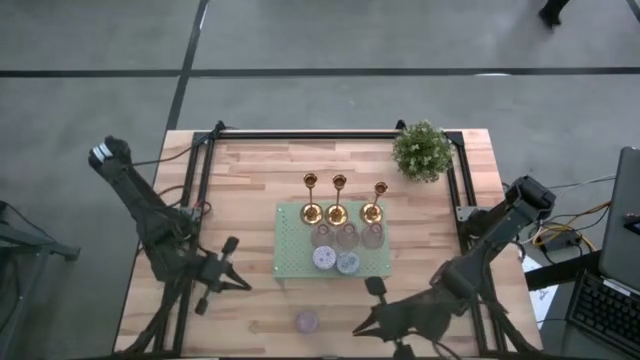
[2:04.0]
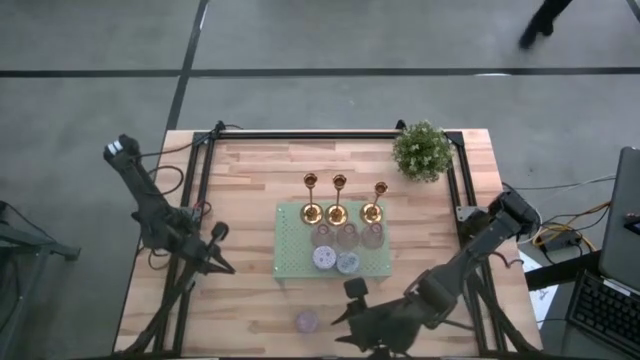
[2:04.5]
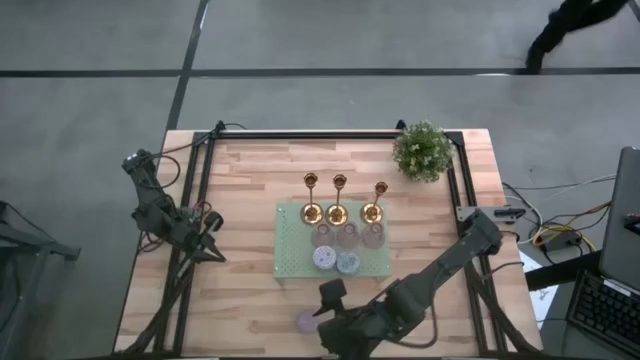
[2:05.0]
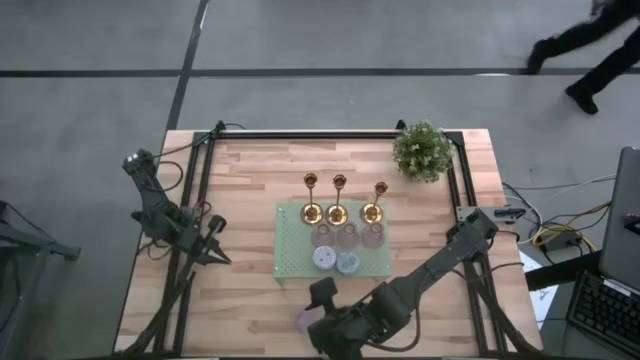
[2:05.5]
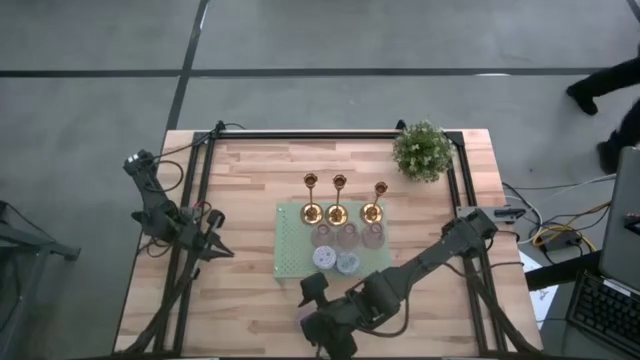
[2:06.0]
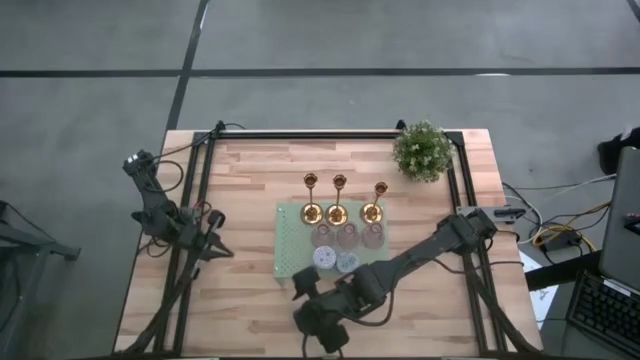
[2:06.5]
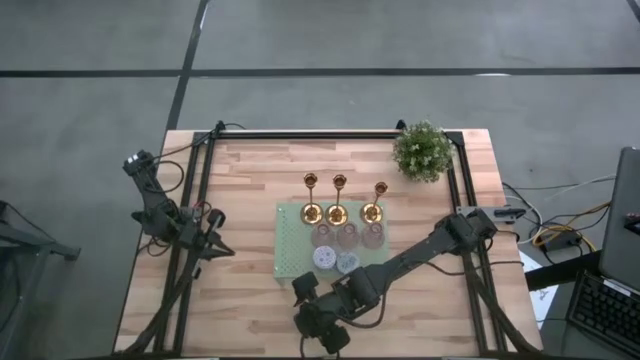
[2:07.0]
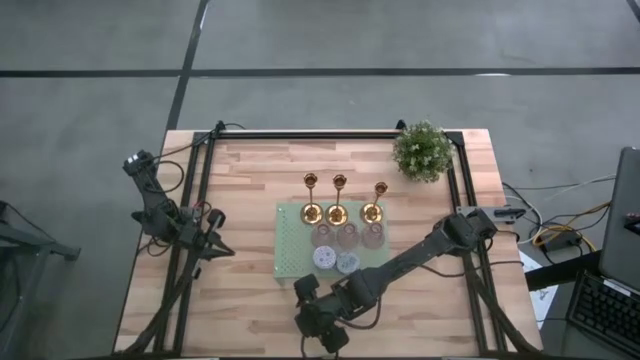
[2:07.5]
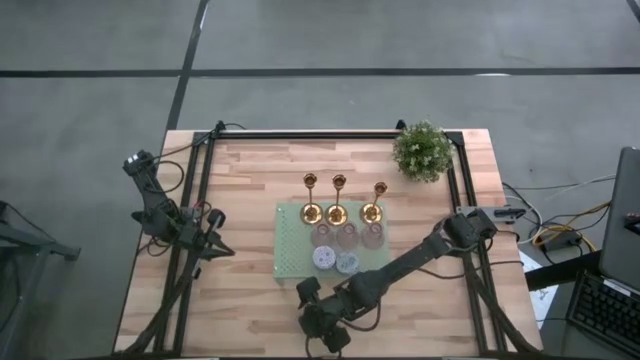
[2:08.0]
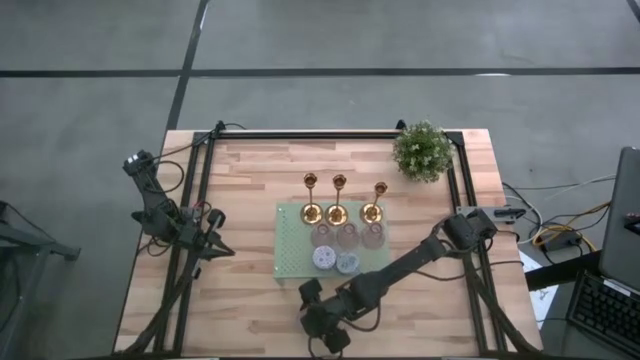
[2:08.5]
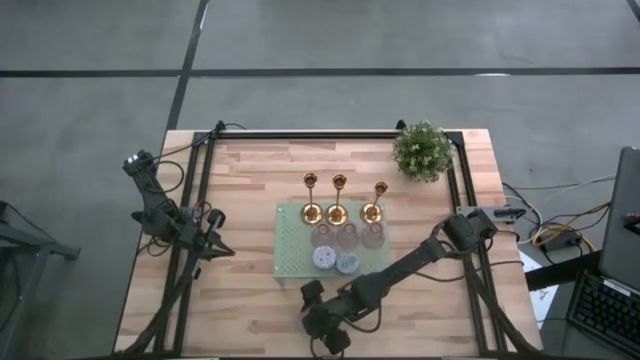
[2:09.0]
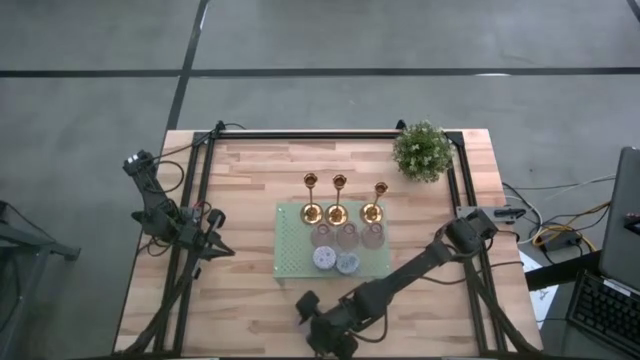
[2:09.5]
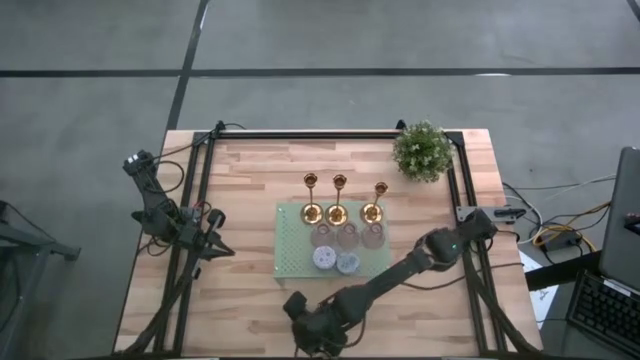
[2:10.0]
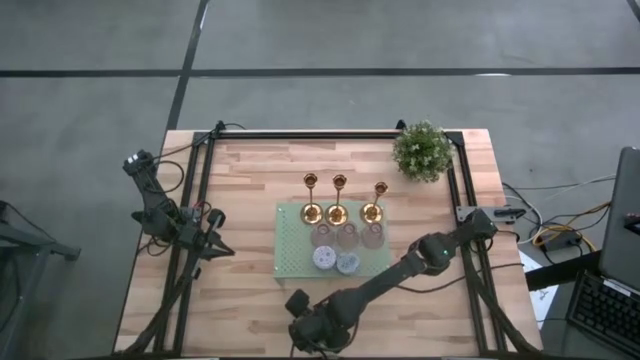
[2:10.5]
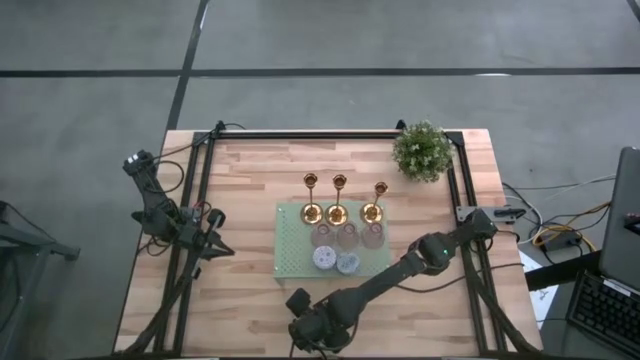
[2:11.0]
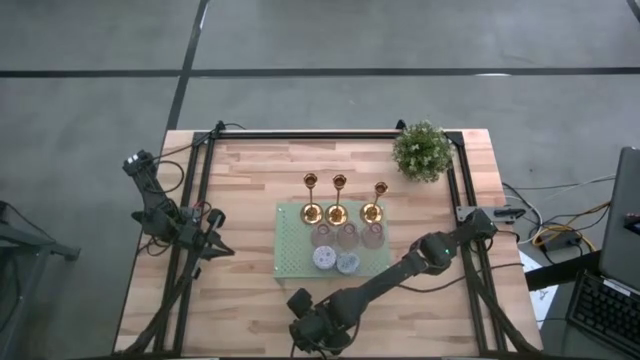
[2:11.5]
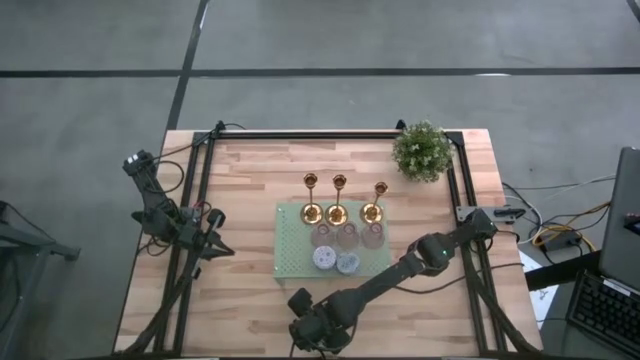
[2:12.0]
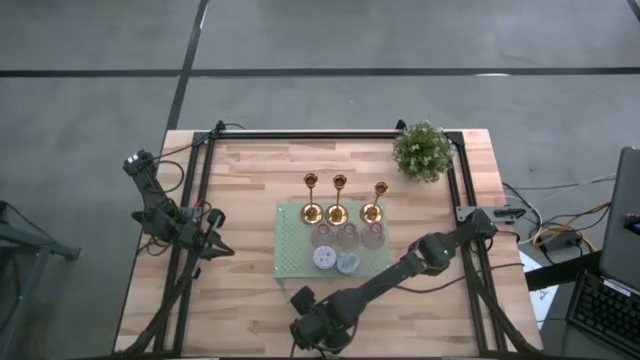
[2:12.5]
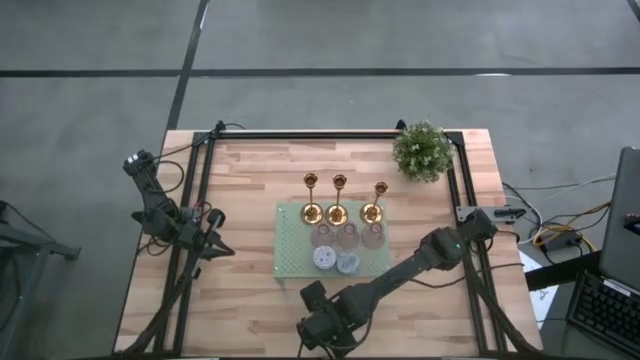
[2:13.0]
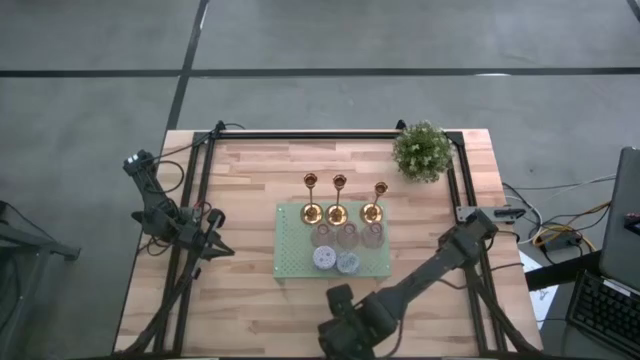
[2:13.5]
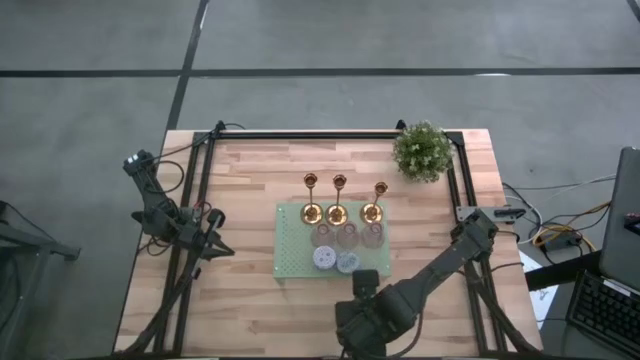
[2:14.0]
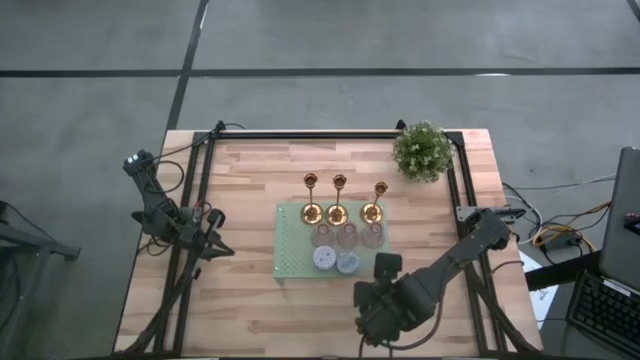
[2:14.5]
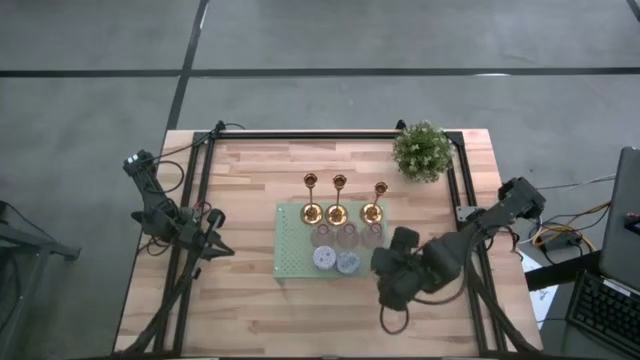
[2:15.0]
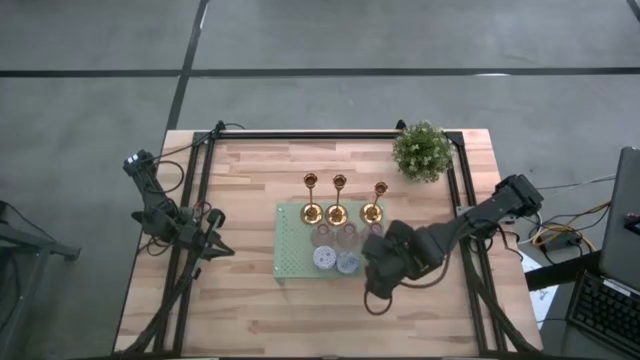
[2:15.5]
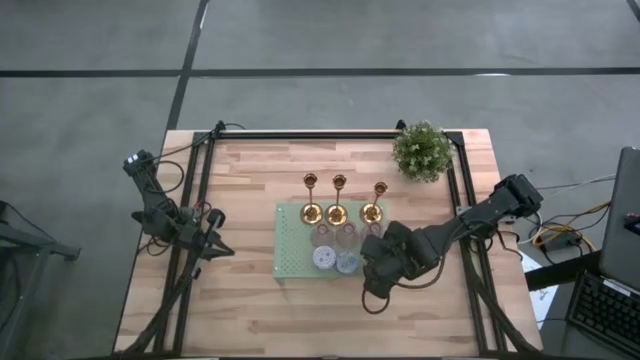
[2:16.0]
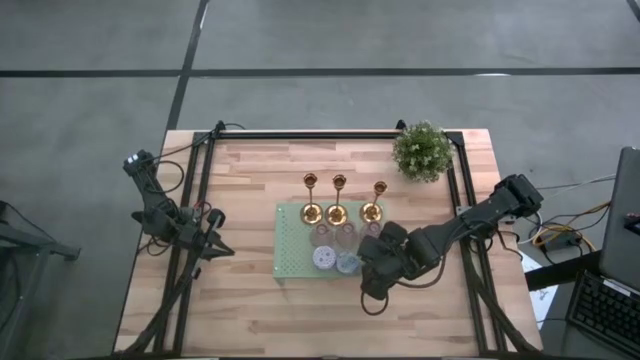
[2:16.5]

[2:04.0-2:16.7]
Task: Pick & Place candle stick holders
Put the pink scented candle on the shelf

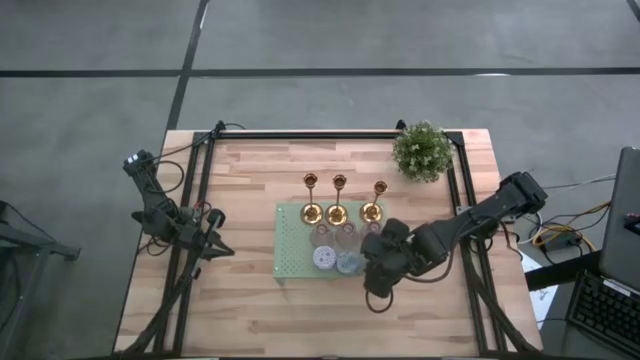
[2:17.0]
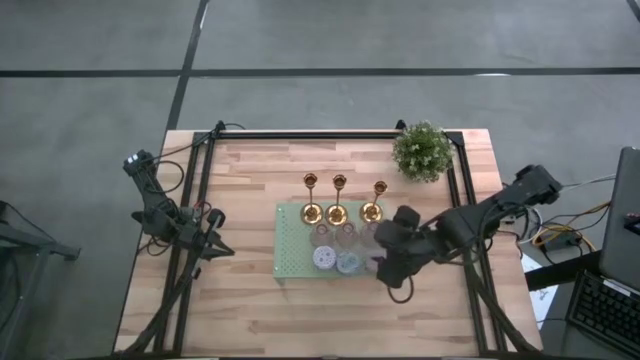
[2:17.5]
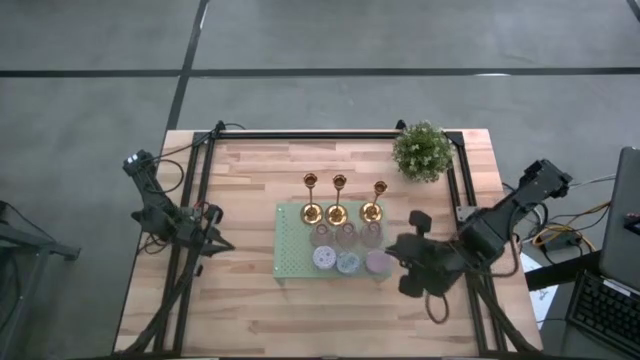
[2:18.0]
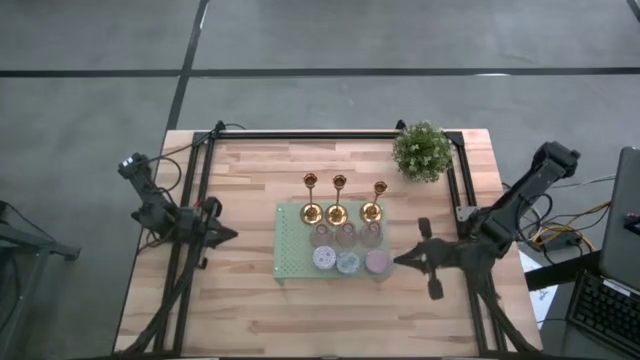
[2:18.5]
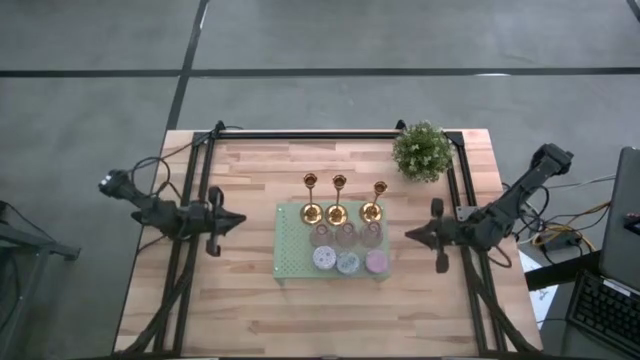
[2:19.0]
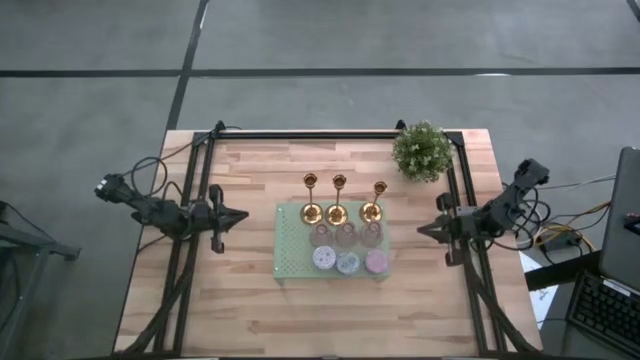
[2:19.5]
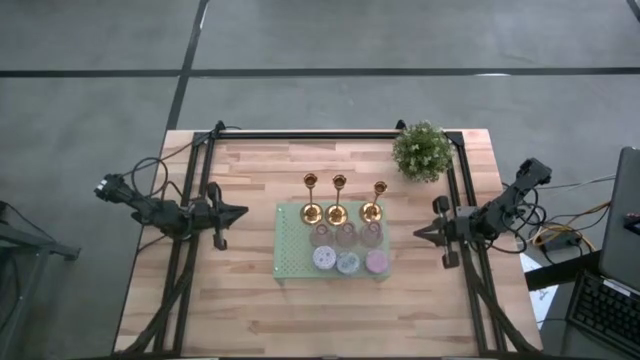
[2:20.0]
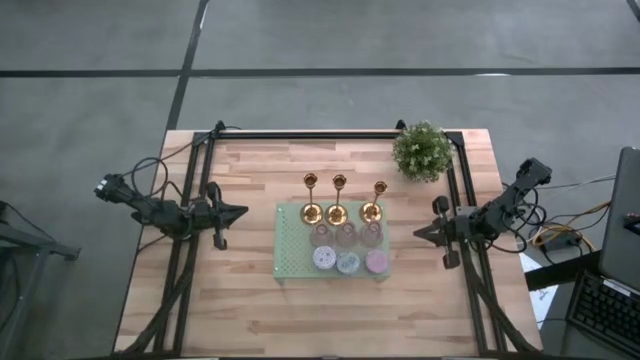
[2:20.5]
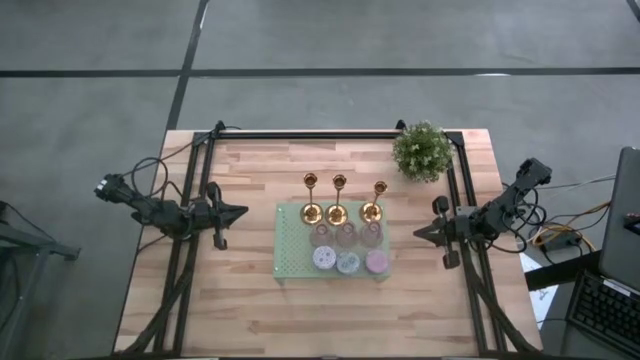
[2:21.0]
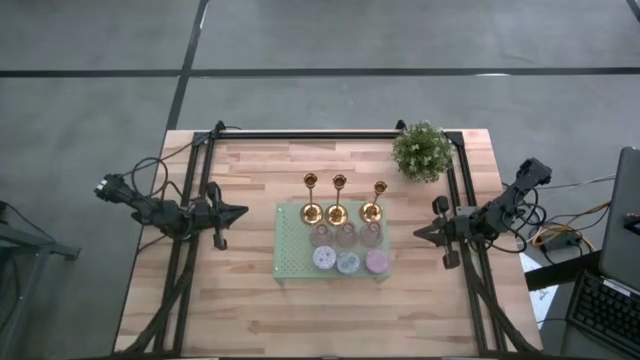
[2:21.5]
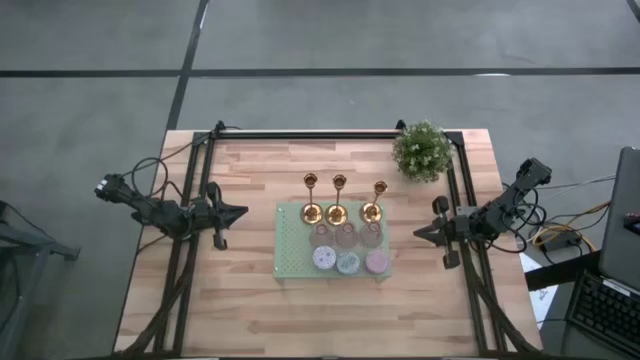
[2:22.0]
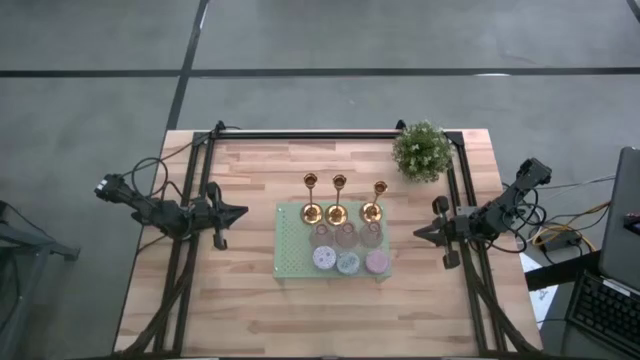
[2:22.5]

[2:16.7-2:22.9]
Return to Home Position

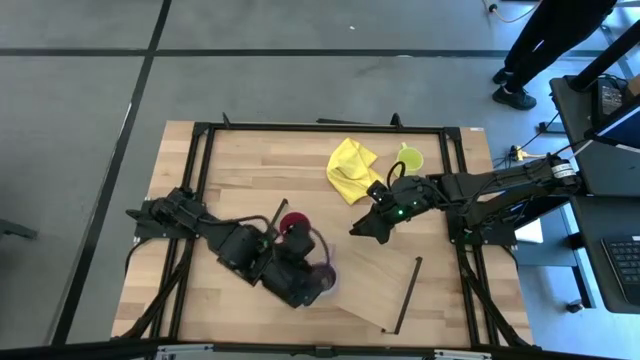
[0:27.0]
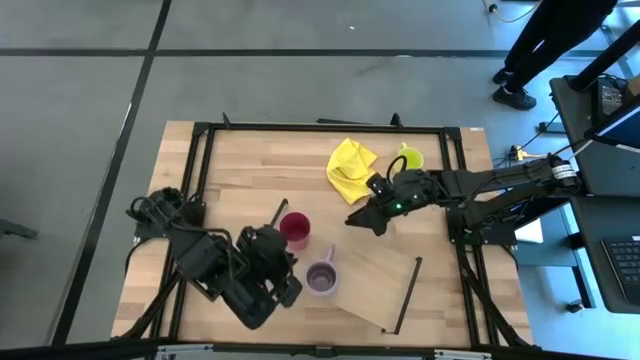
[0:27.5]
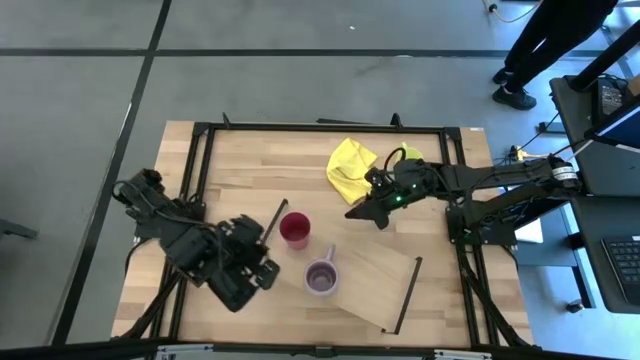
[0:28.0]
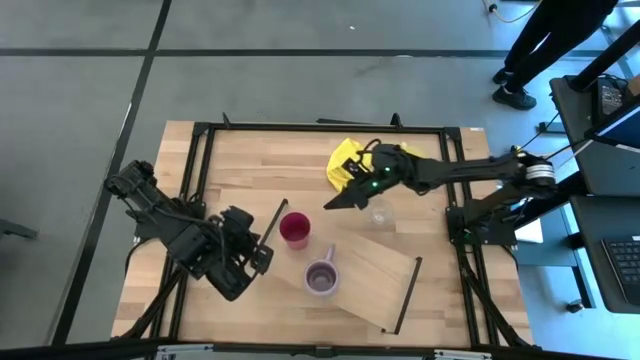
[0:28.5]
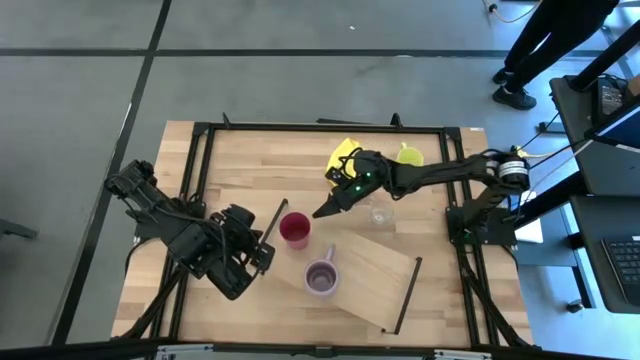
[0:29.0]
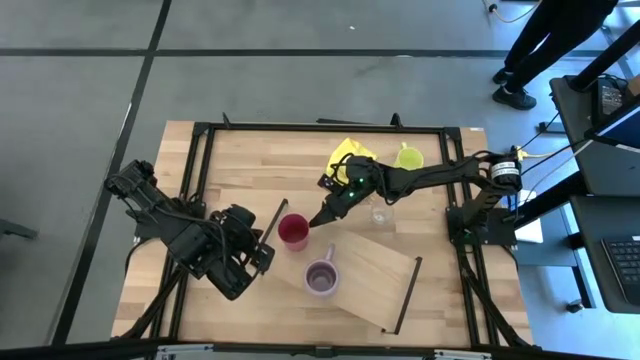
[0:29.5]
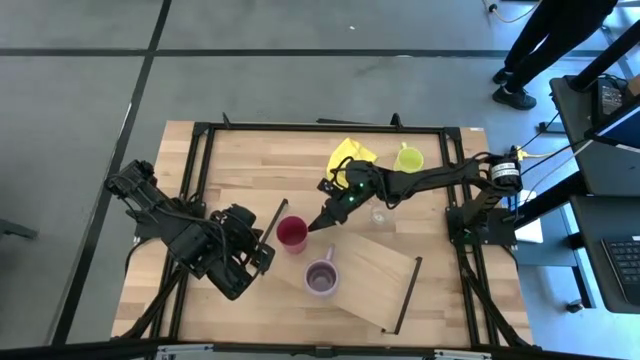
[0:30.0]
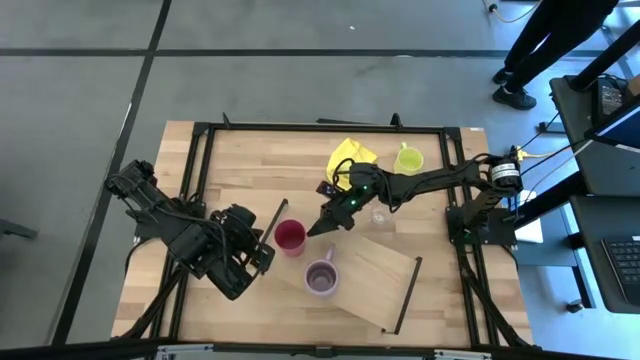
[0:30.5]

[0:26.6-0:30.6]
Task: Stack small to large cups/mugs on shelf
Adjust the pink cup on the shelf
